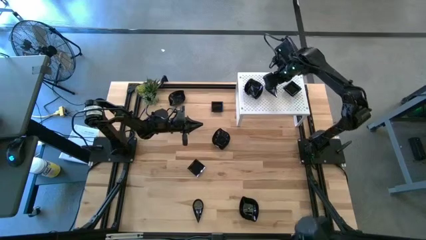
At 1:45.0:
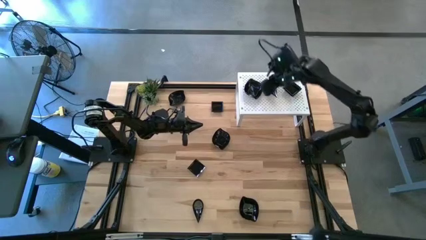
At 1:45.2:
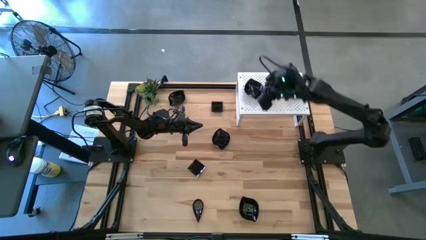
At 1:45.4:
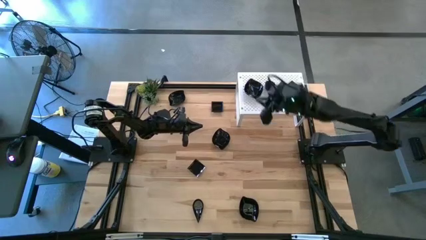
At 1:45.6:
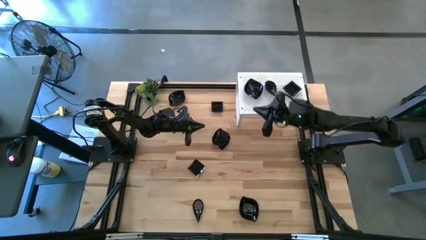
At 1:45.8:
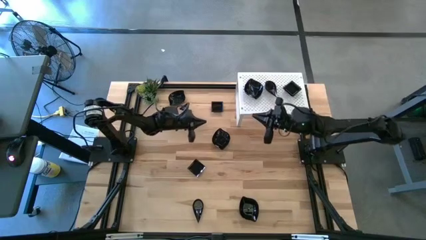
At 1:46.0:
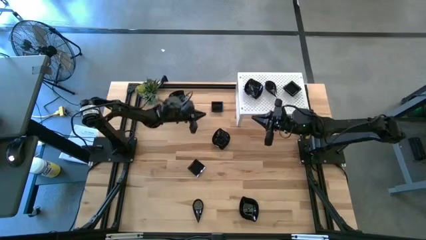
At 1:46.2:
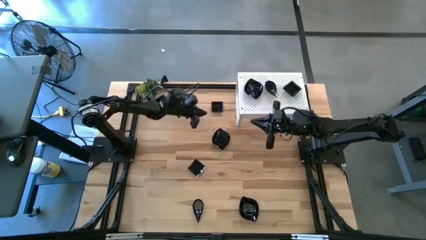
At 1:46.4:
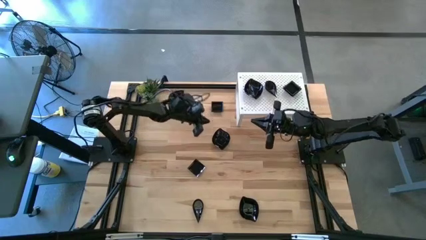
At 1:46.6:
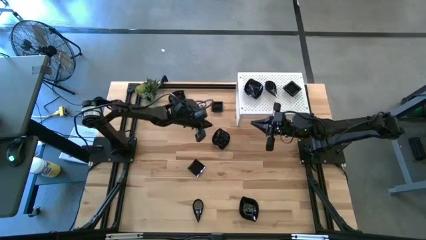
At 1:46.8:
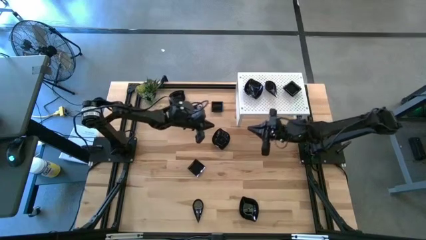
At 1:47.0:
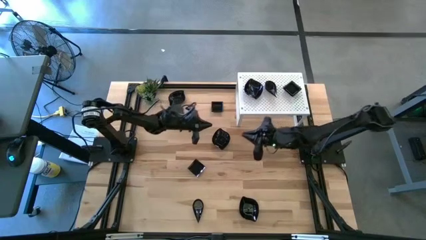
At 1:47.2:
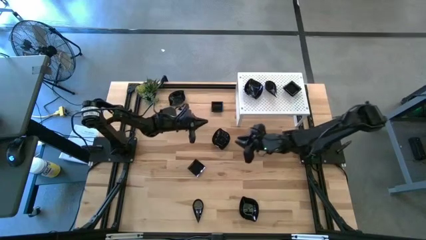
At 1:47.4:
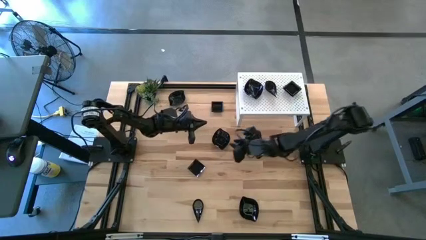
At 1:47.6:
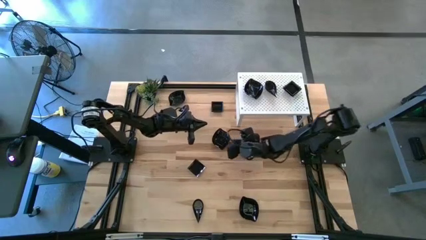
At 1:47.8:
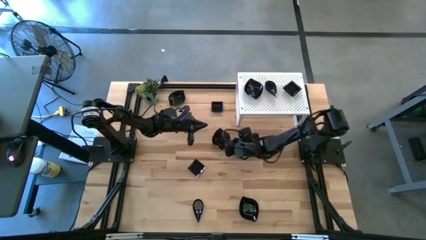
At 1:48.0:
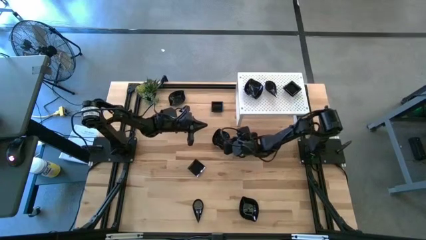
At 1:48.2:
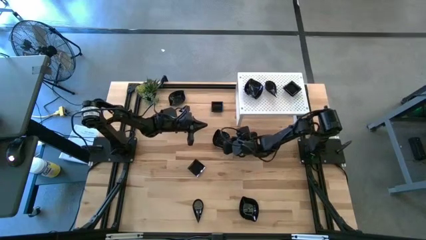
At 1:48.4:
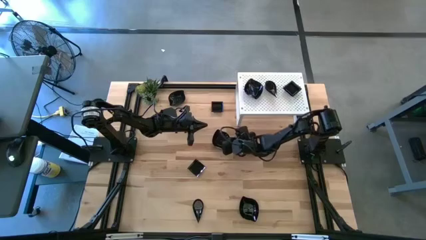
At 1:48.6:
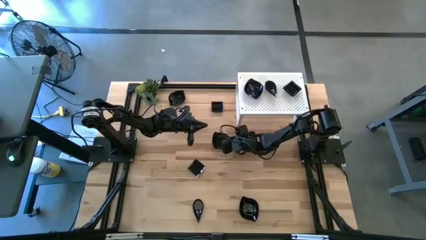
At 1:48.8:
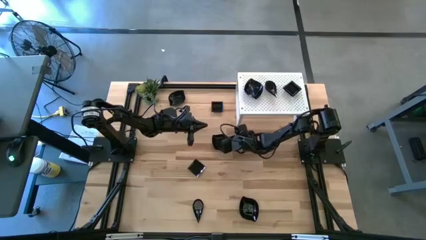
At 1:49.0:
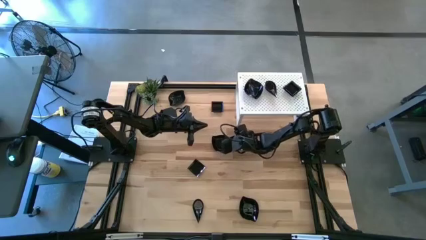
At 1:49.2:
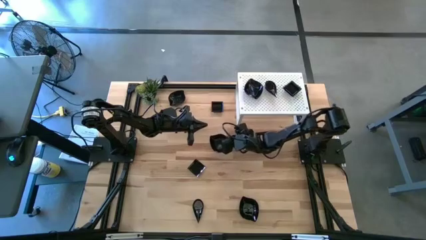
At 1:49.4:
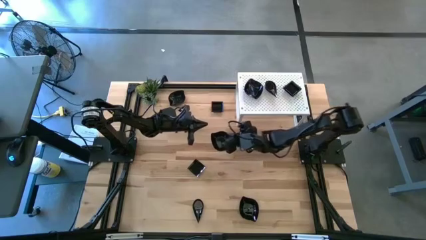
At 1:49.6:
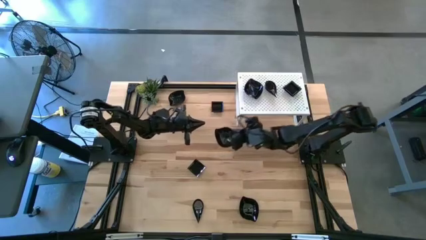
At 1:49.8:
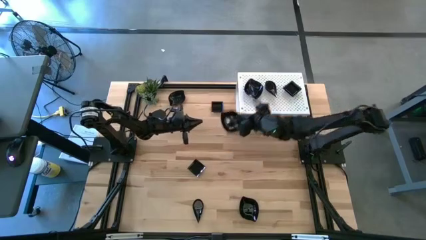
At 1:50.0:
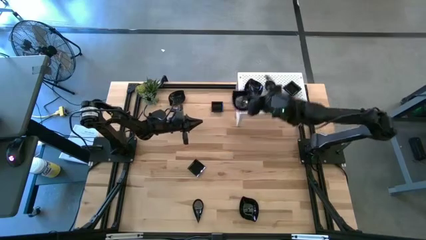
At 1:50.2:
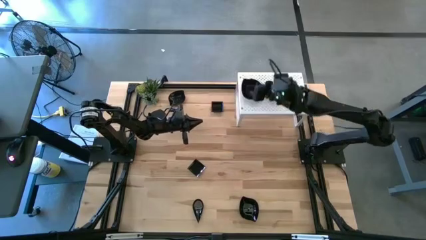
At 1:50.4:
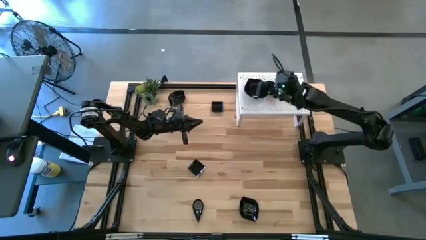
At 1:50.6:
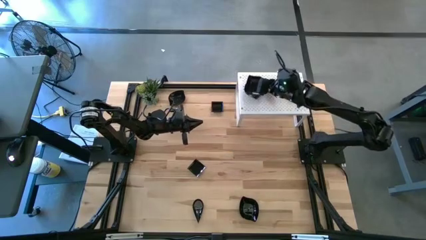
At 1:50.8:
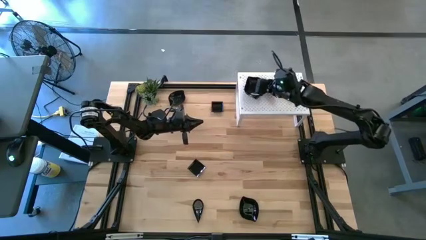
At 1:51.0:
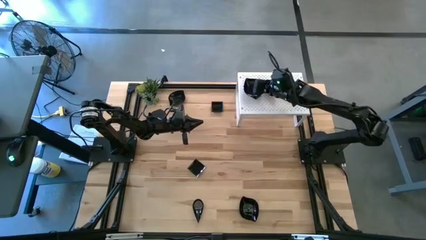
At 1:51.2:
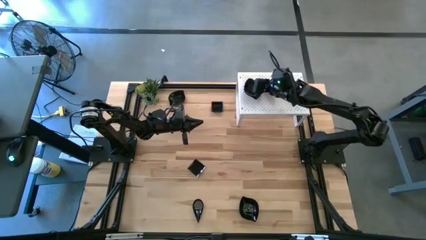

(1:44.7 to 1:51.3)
Task: Pick & Place Mini shaped plates
Stack the black leaf-shaped plate on top of the black leaf-shaped plates on the shelf

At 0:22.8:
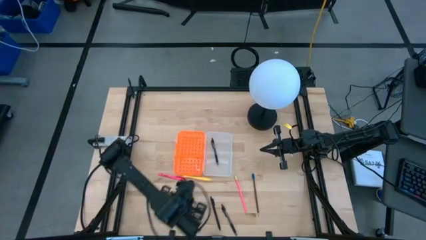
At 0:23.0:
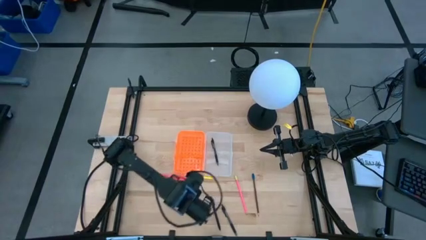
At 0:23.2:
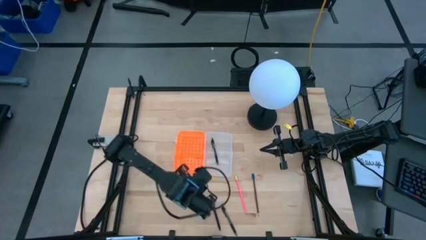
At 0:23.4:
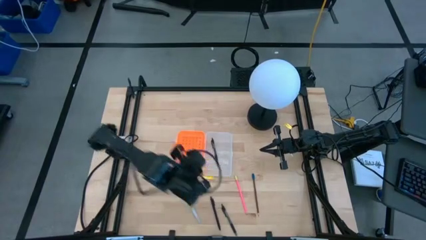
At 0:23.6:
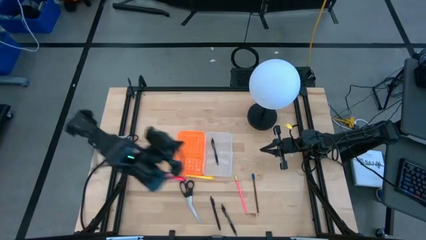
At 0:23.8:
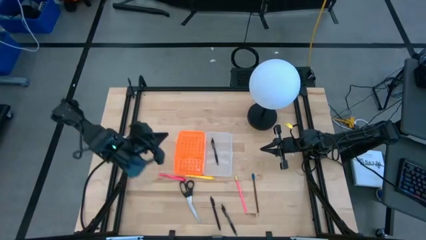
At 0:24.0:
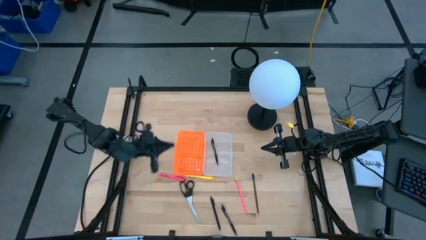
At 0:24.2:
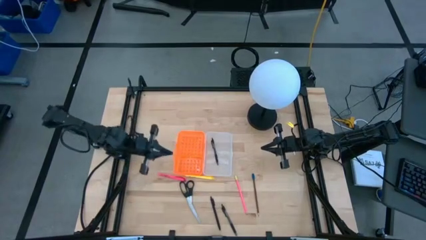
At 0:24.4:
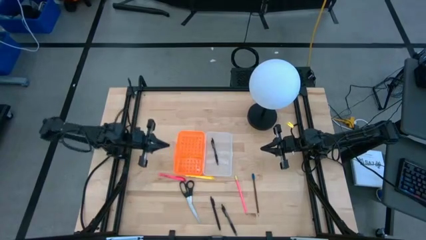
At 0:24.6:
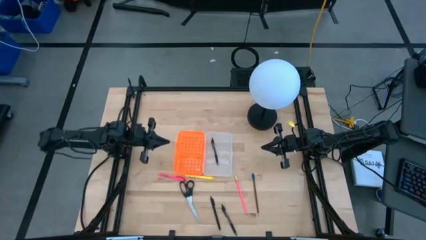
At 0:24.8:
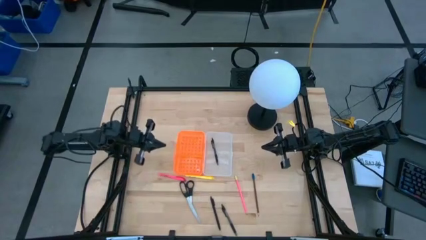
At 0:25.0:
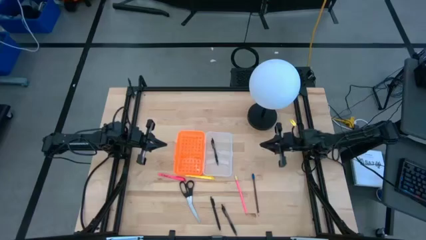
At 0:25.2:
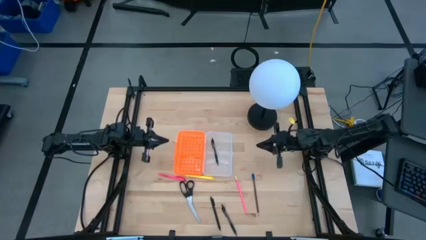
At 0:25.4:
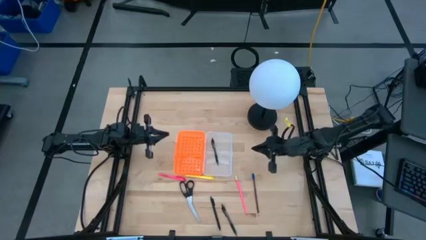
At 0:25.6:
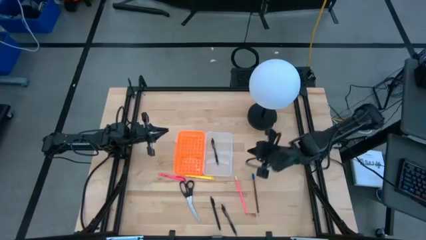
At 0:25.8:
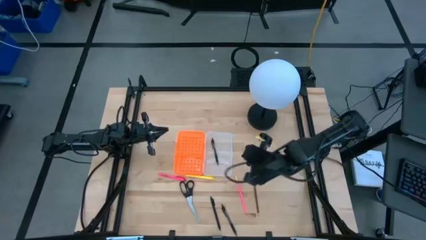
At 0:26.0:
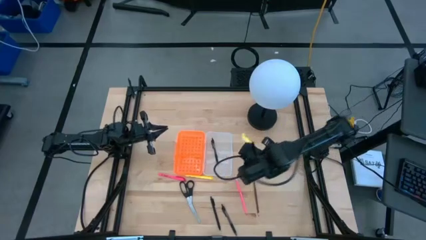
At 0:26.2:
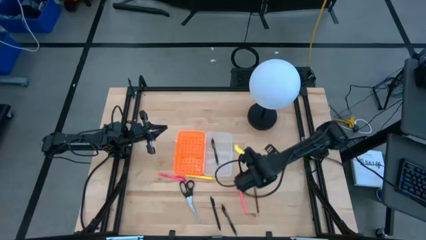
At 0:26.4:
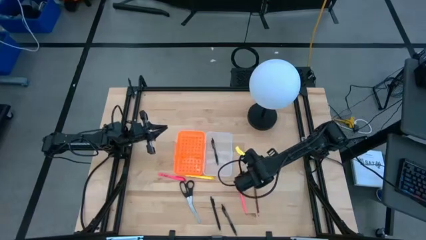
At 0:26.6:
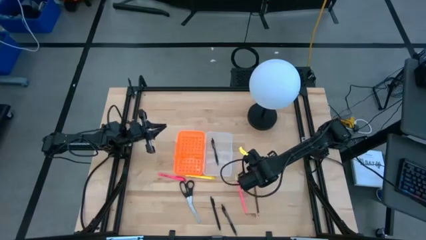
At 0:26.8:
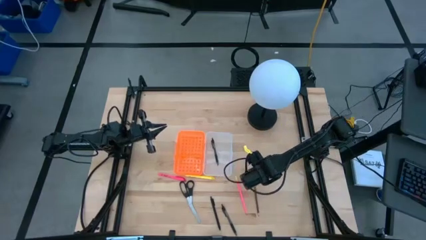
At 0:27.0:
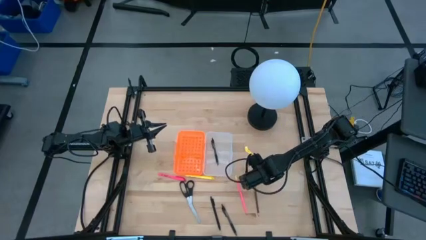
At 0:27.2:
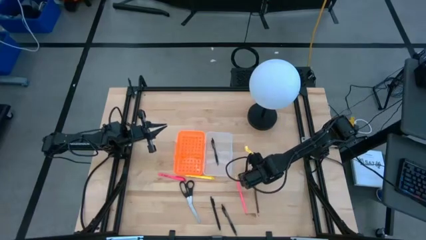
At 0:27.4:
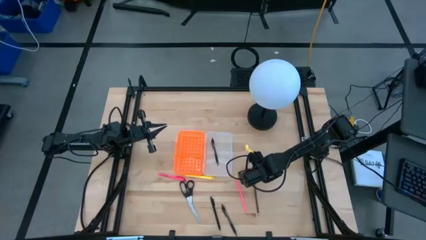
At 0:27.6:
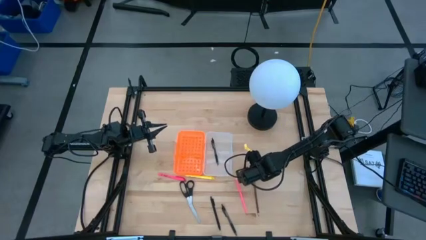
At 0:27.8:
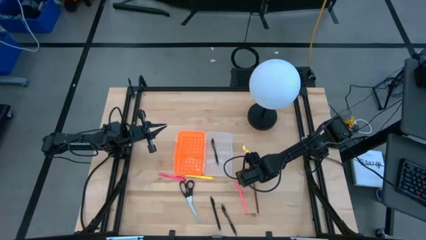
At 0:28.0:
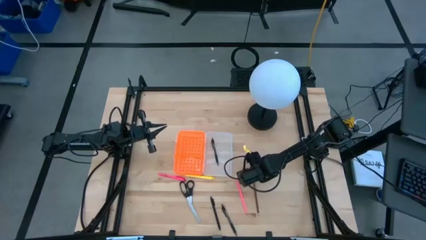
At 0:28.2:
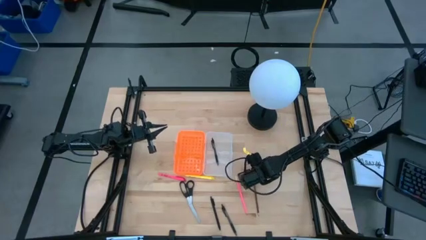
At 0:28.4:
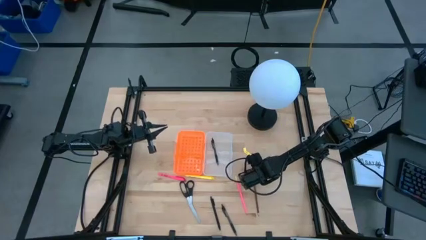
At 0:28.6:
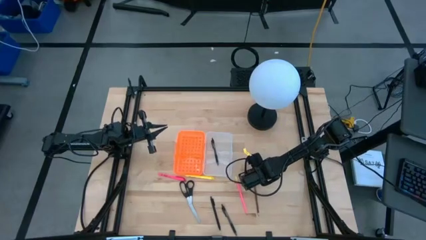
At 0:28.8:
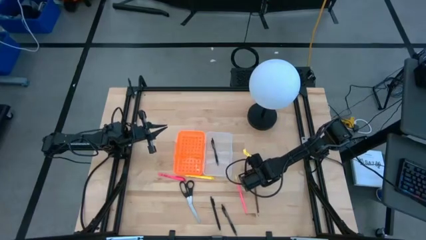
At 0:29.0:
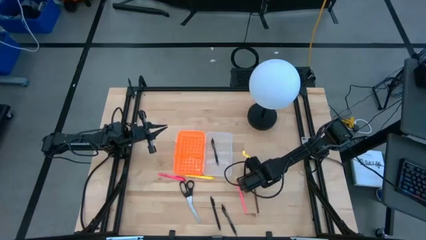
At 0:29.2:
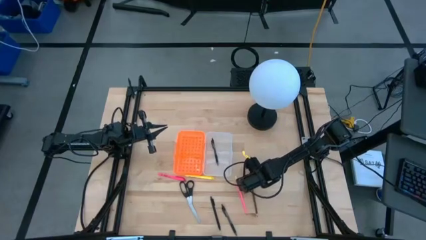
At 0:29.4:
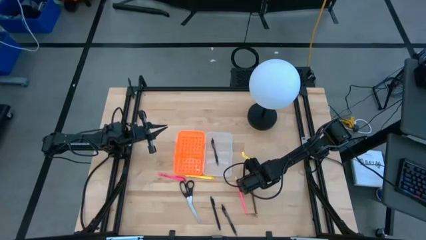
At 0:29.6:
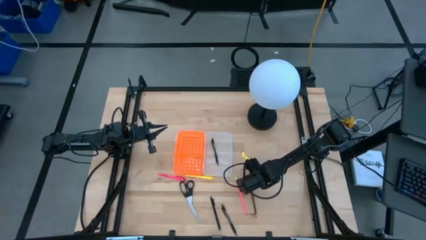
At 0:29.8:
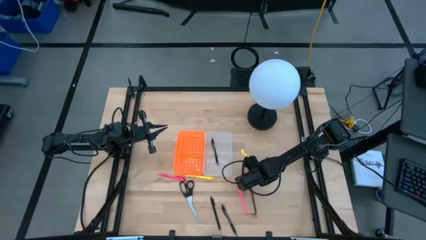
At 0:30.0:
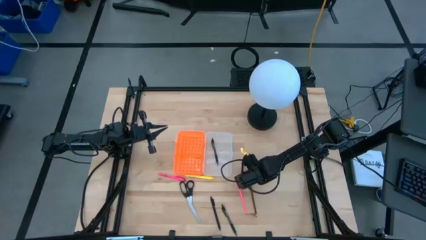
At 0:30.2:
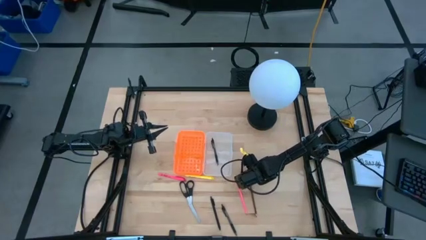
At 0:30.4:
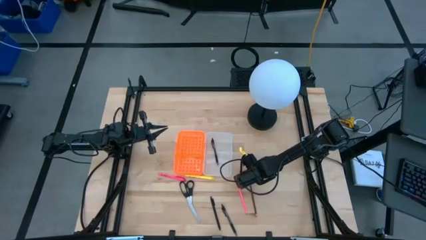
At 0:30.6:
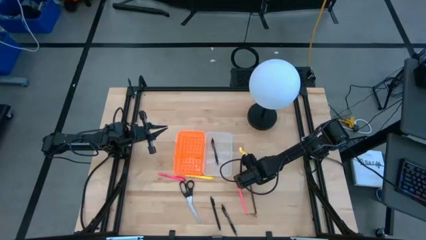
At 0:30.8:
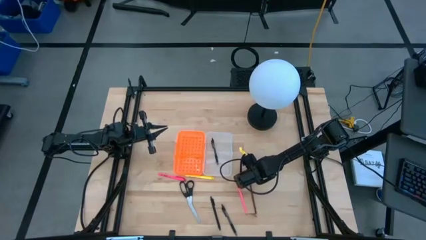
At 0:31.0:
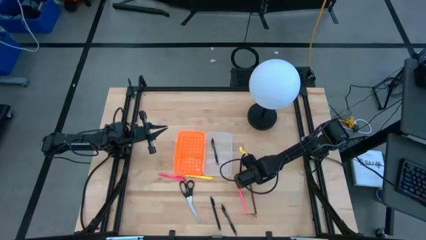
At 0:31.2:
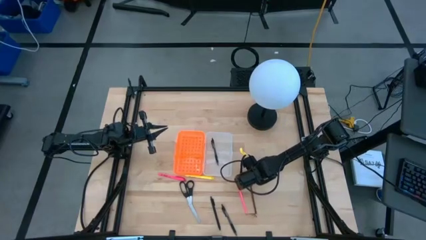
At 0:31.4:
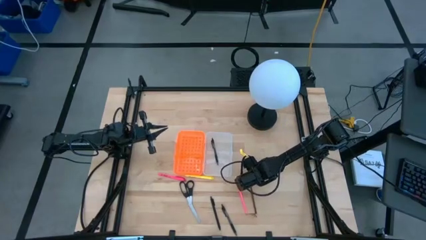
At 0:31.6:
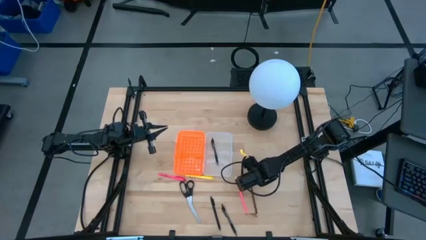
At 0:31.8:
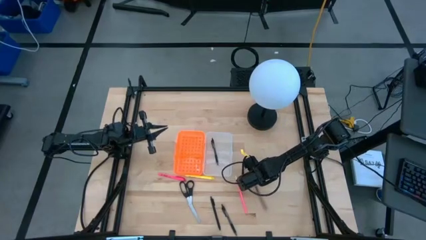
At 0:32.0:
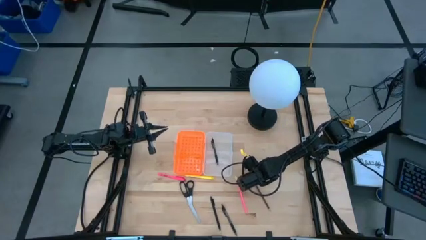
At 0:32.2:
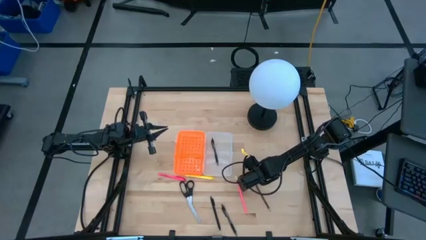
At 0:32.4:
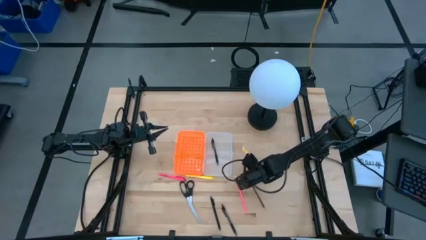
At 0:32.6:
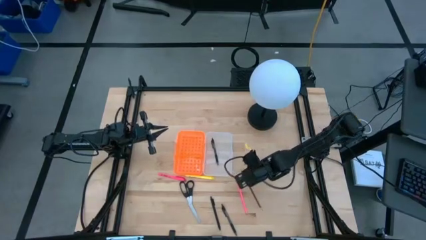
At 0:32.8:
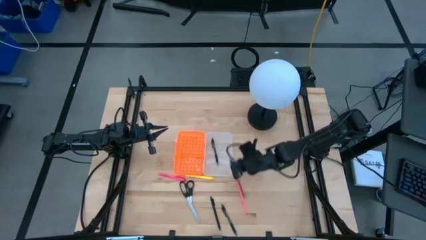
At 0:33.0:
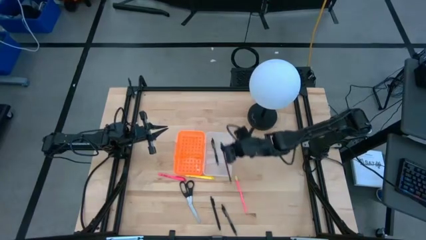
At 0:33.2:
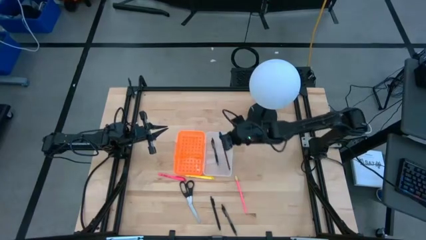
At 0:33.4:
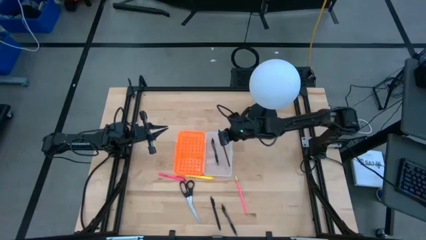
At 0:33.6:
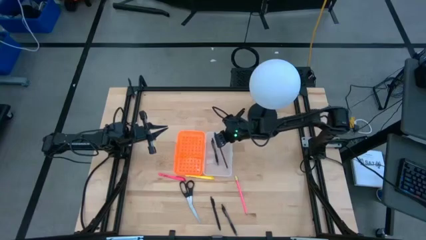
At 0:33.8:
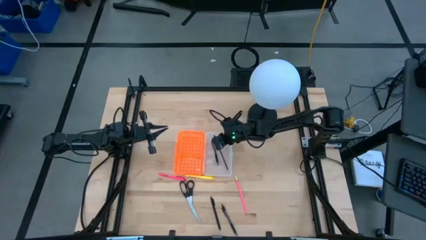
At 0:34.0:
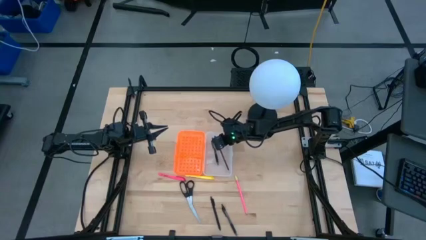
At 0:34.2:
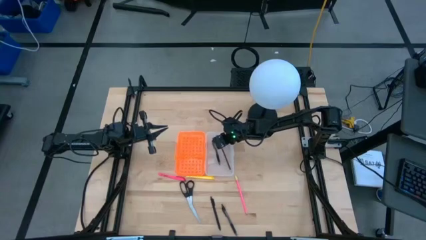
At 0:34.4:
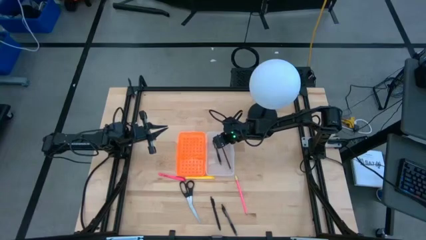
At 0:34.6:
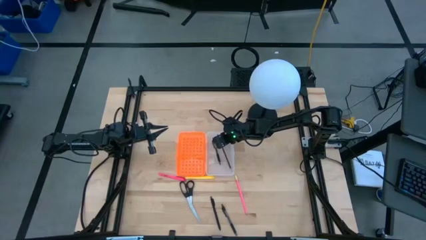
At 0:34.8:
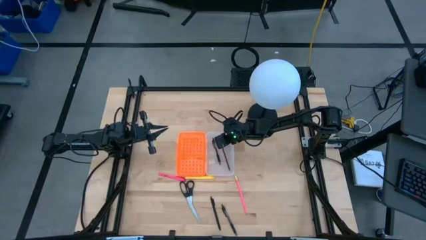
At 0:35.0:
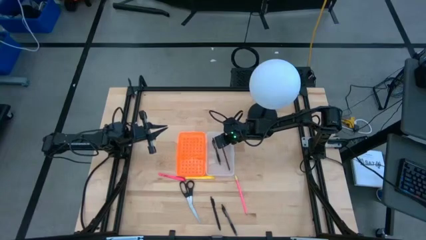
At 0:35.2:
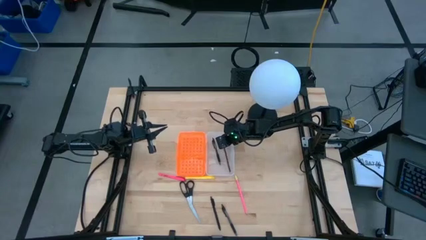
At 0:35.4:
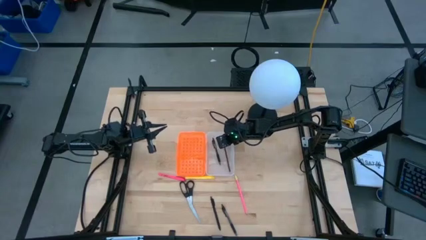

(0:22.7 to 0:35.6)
Task: Pick & place school supplies into a supply box
Put the brown pencil into the supply box
